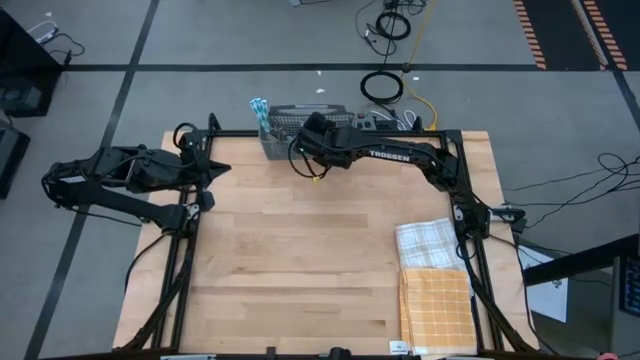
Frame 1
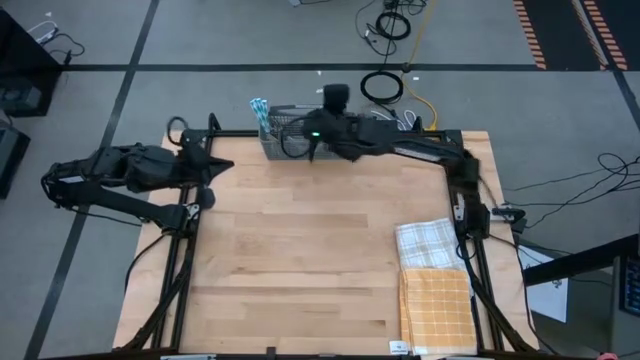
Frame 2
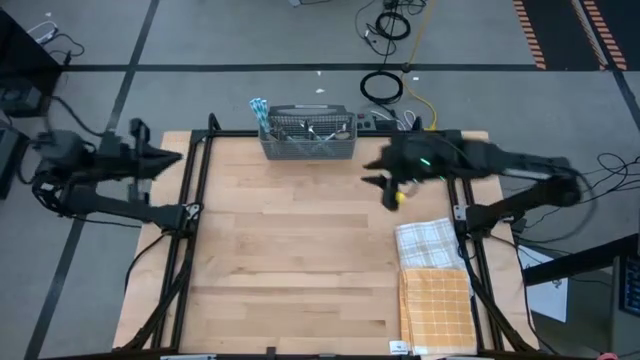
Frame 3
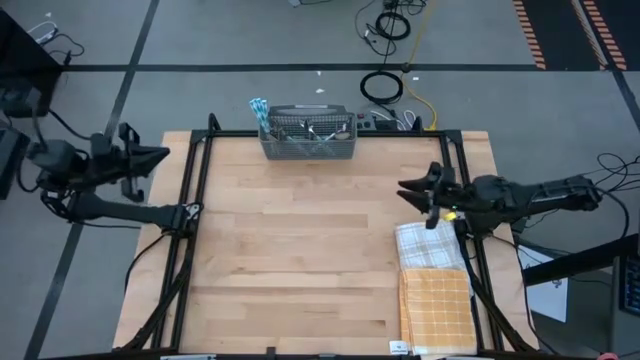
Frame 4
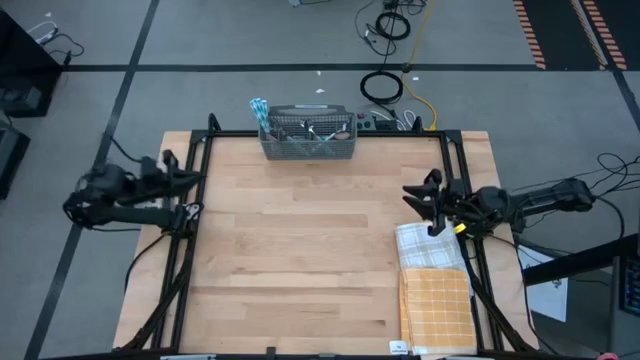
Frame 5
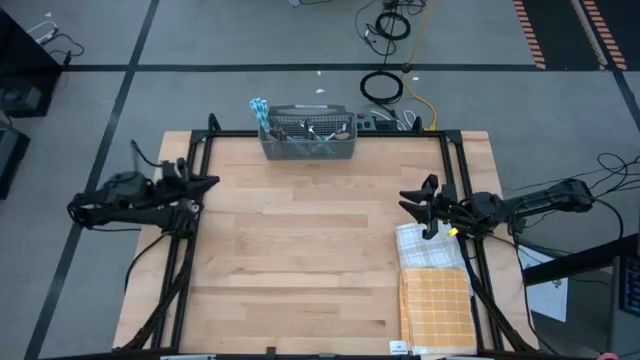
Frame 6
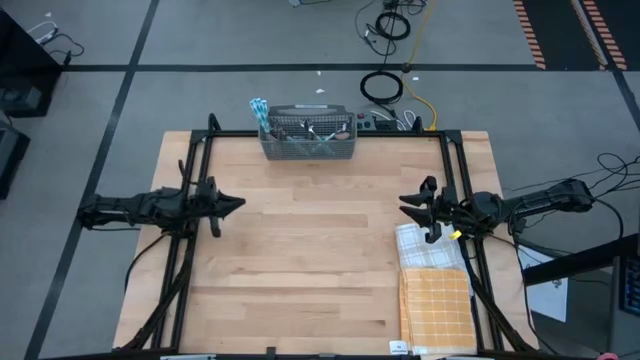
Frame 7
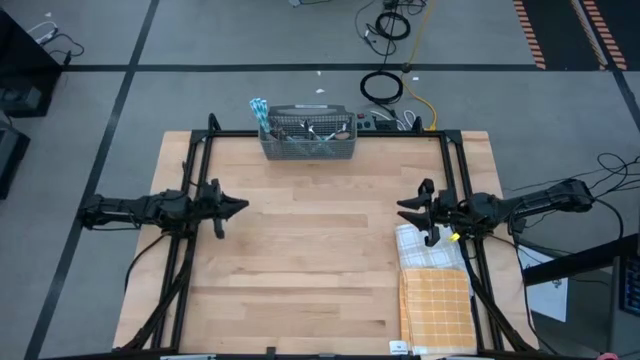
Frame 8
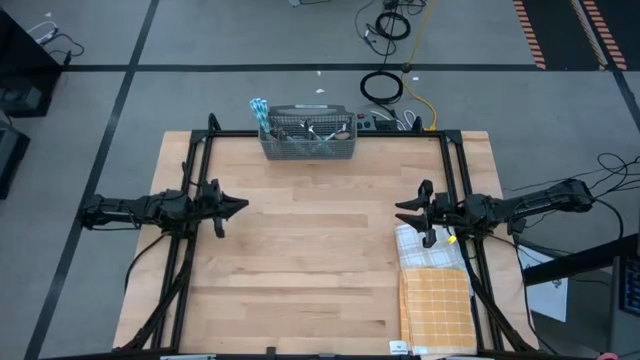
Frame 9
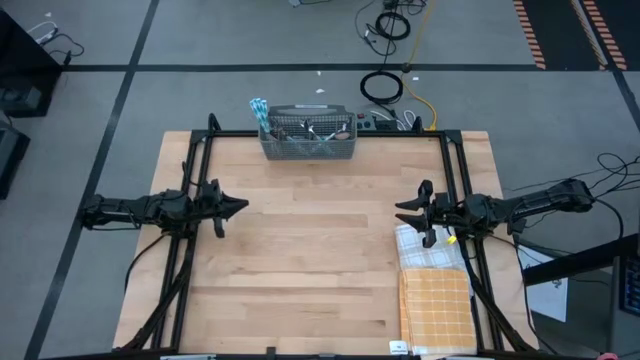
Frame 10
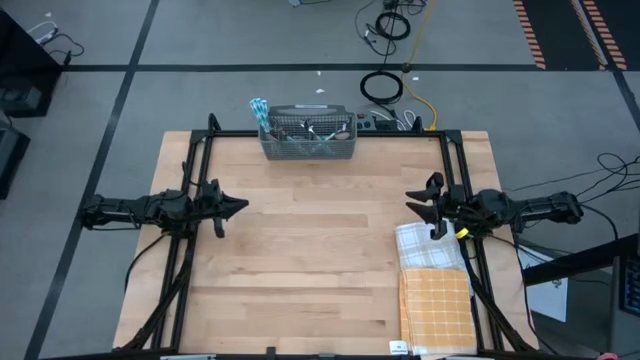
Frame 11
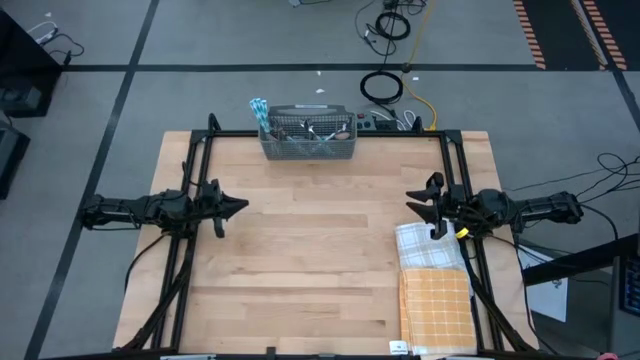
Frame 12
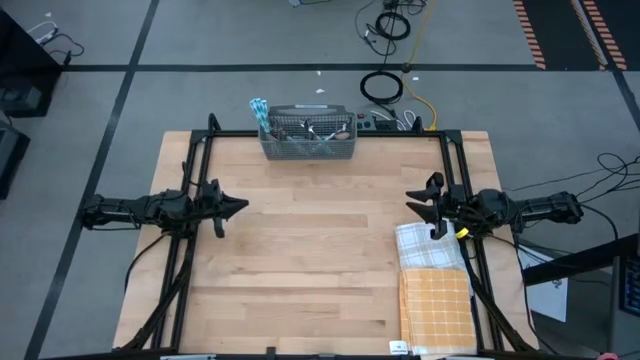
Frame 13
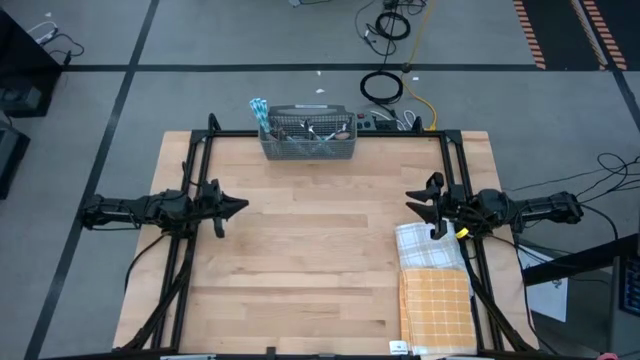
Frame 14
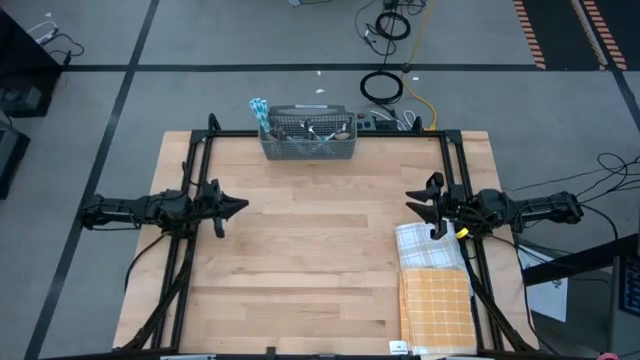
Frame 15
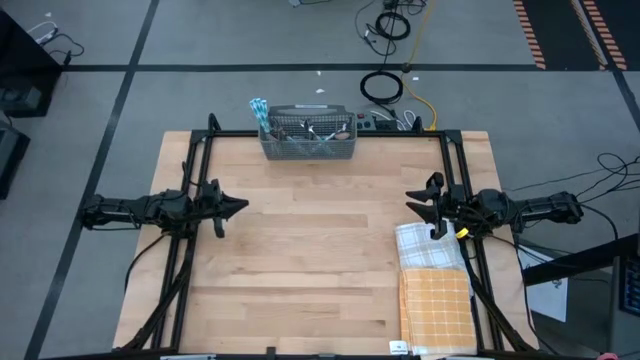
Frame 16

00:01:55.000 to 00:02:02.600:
Task: Sort silverware
Return to Home Position

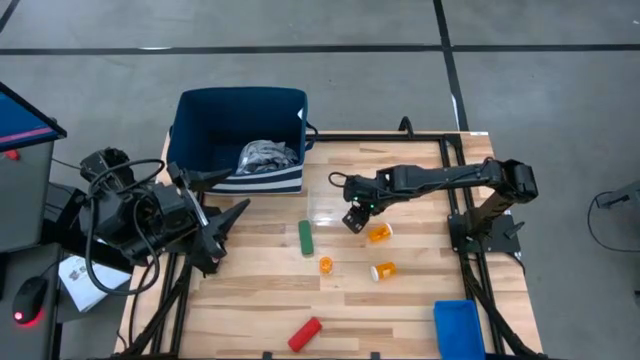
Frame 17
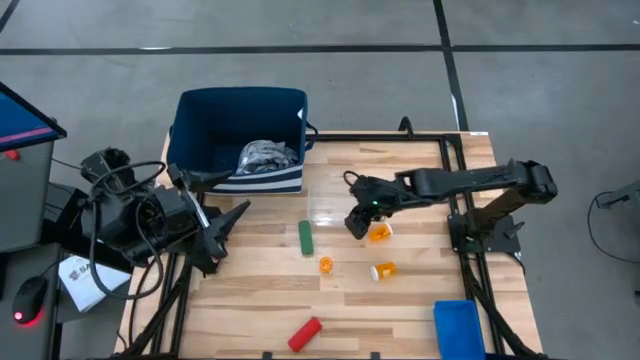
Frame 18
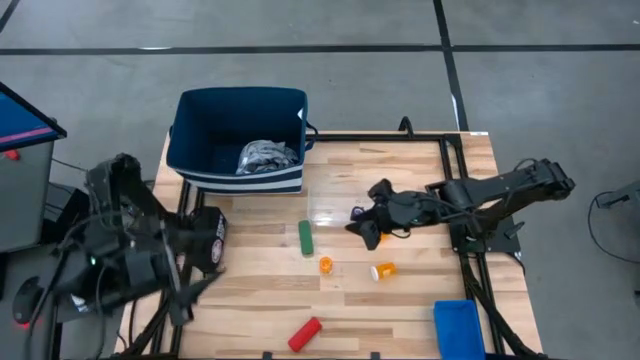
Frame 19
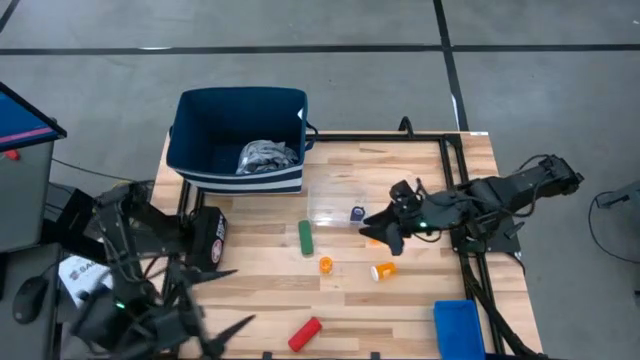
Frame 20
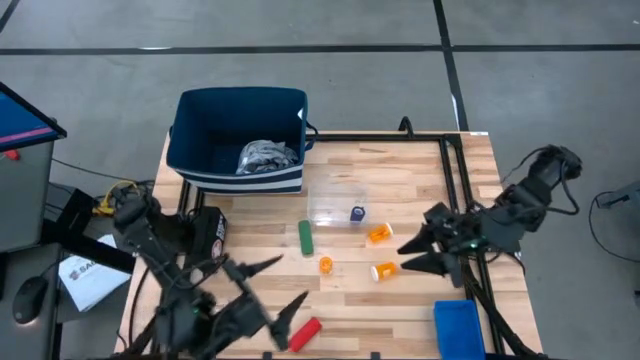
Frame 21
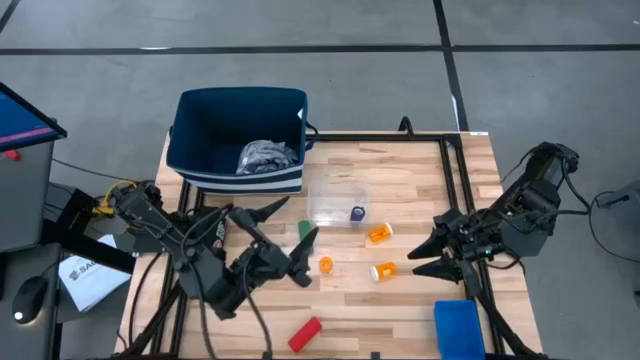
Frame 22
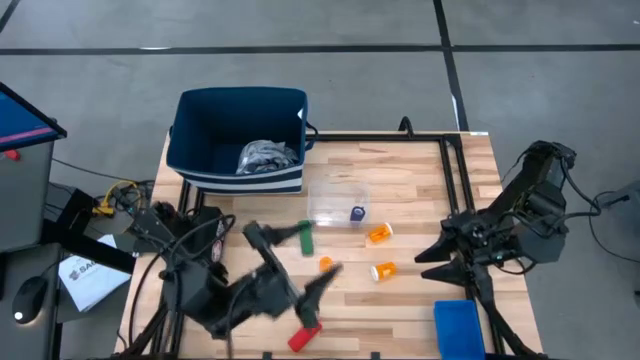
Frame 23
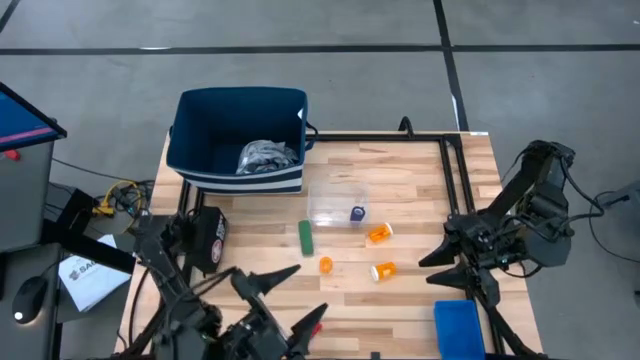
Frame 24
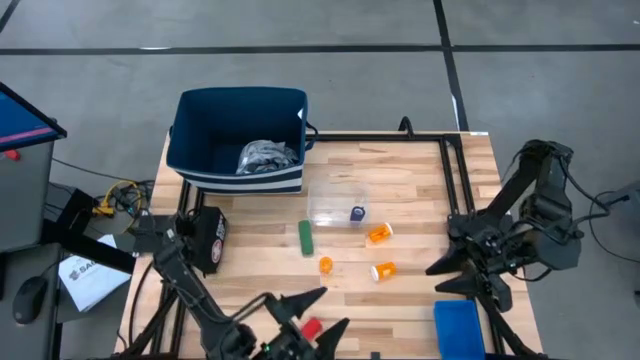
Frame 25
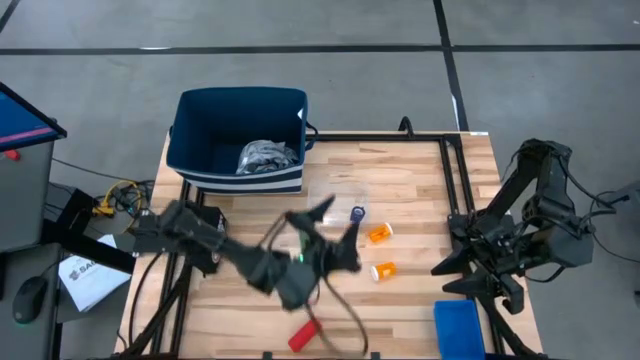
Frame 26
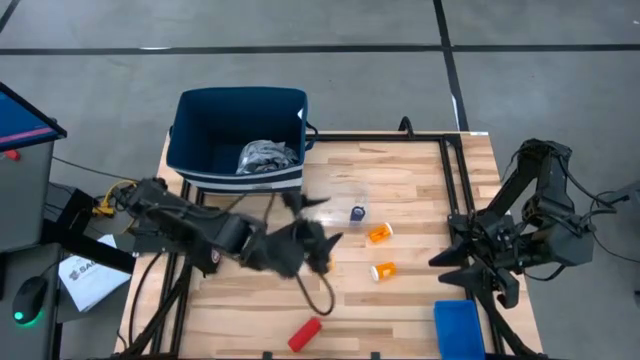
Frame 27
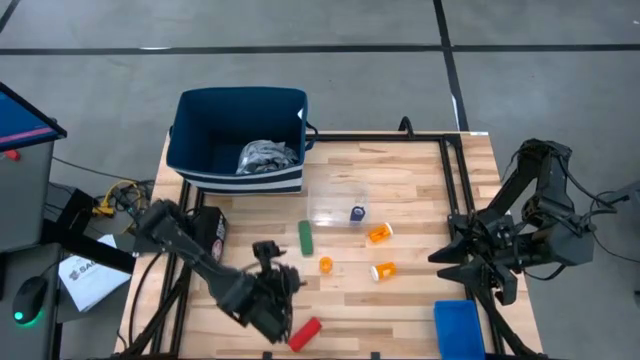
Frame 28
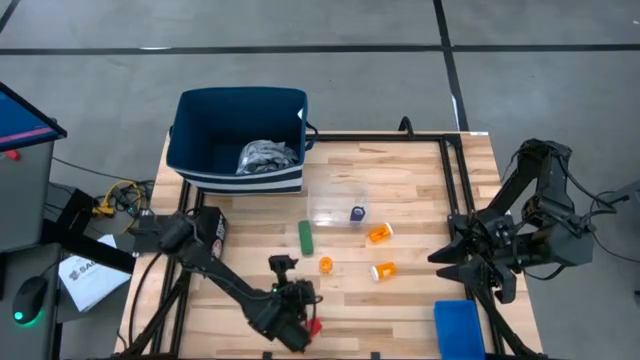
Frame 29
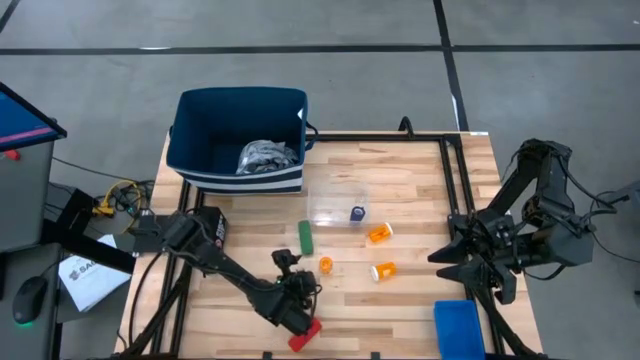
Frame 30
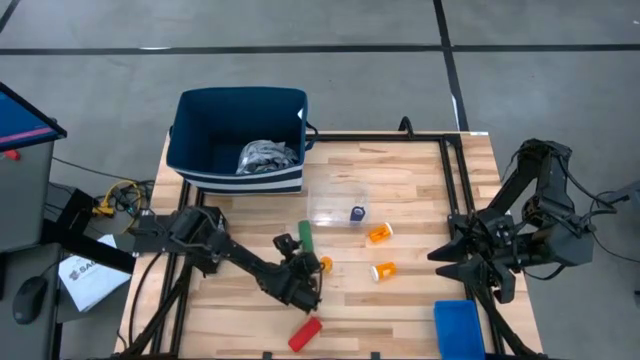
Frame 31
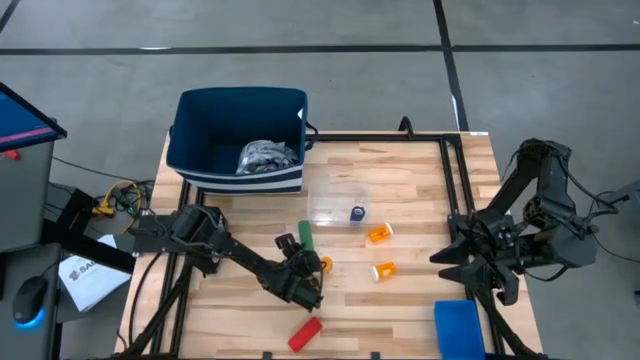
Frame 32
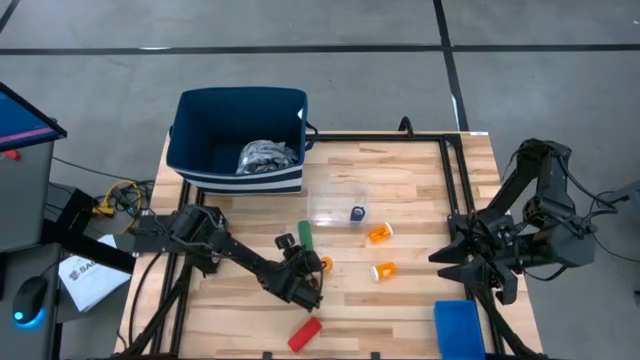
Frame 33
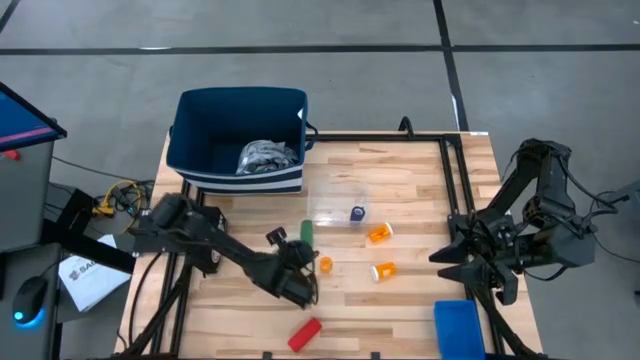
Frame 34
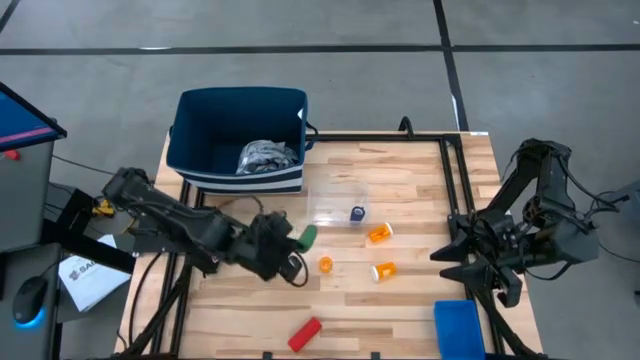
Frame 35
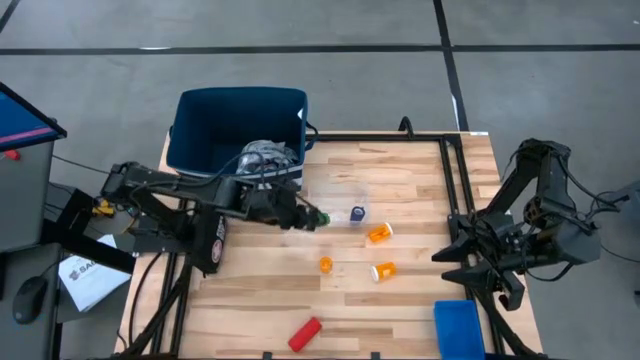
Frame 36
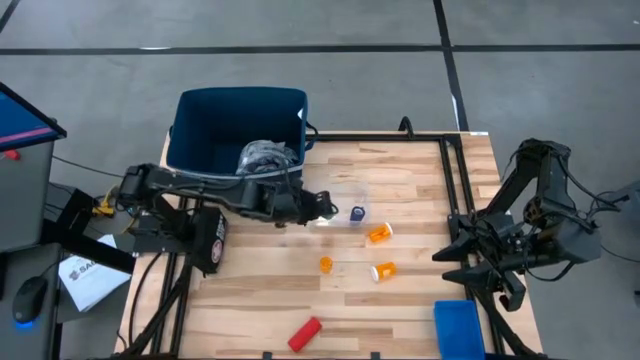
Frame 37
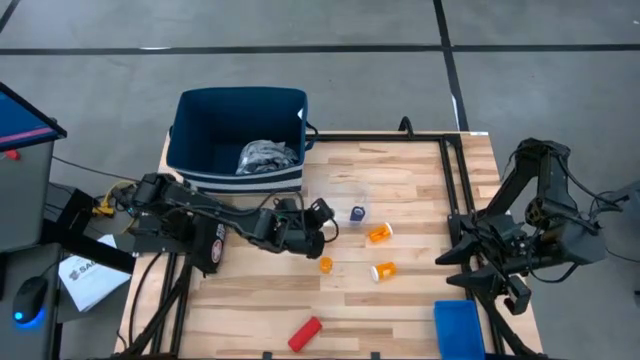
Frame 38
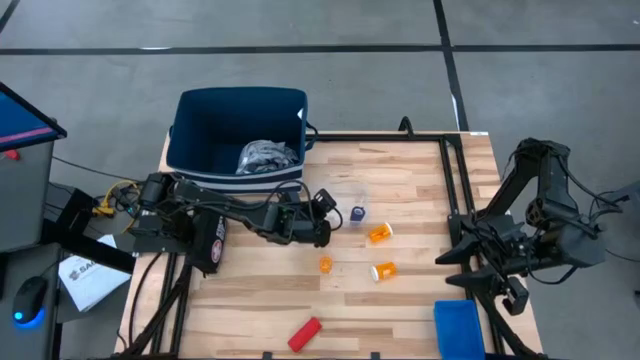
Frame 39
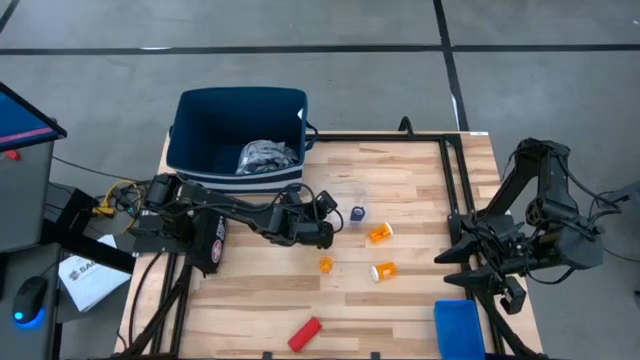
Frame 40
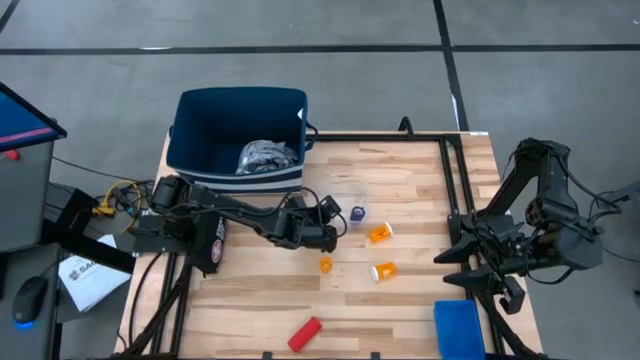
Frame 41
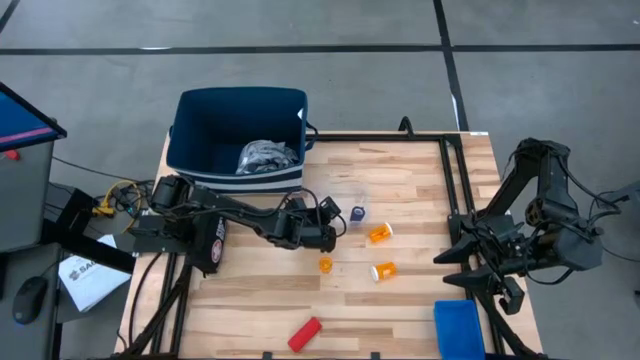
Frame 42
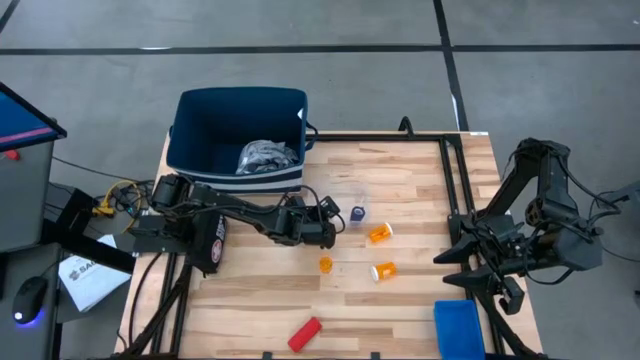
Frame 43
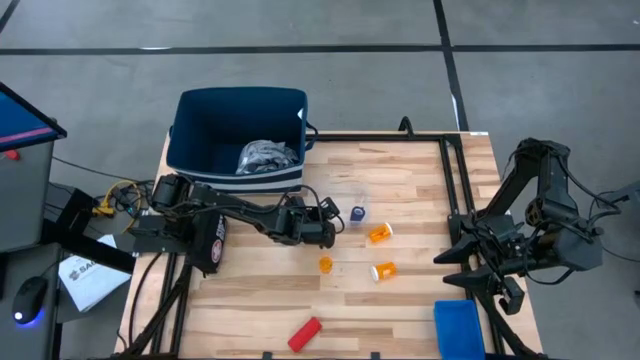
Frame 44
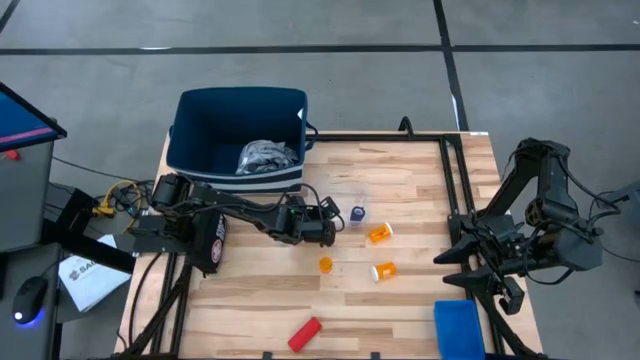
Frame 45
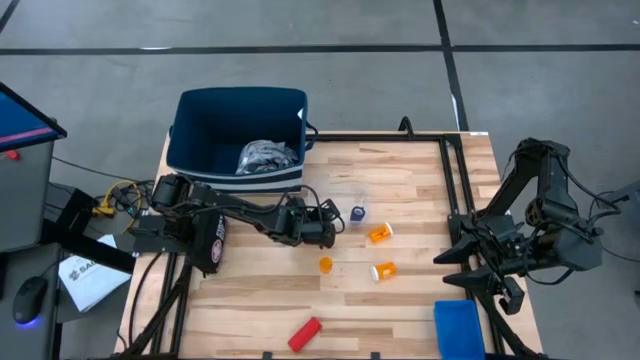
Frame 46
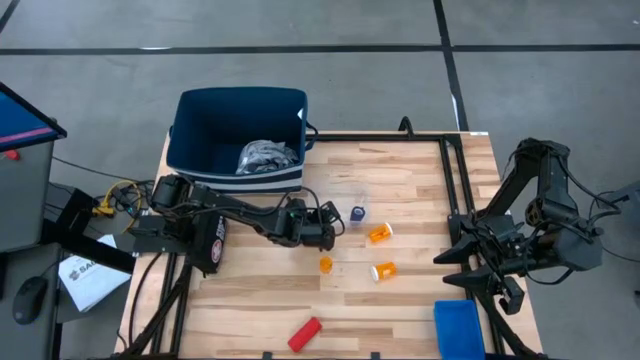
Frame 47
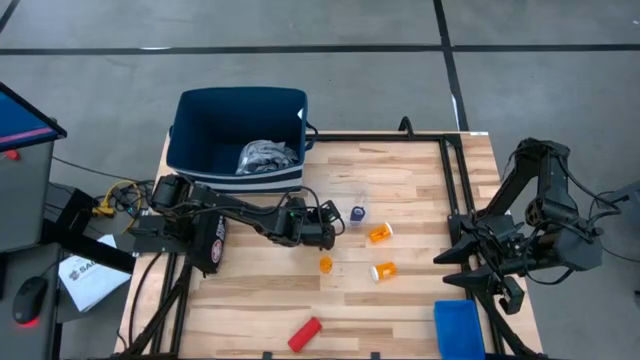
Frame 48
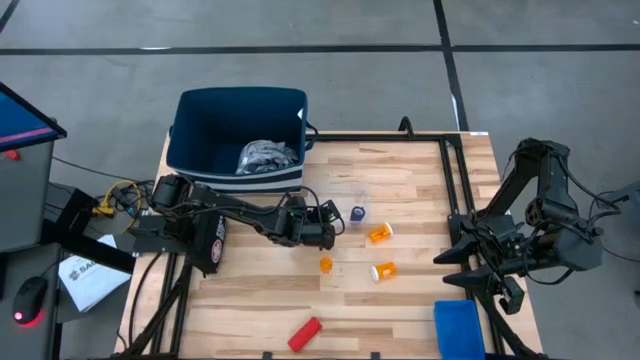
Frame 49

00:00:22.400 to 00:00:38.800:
Task: Pick & place medical supplies in basket/bin
Put the green bandage into the transparent bin
